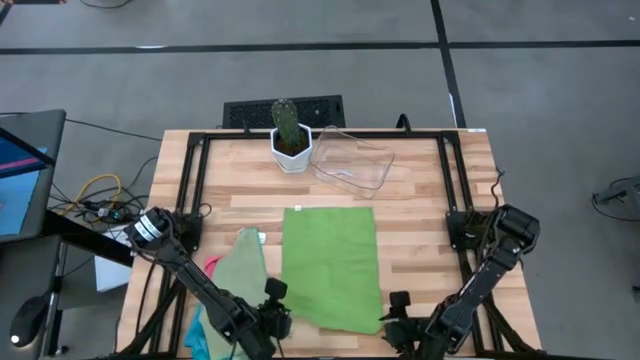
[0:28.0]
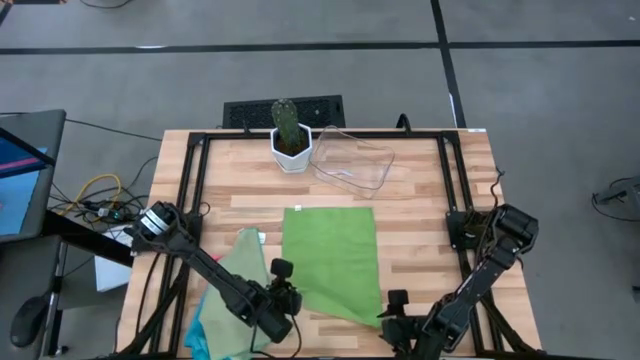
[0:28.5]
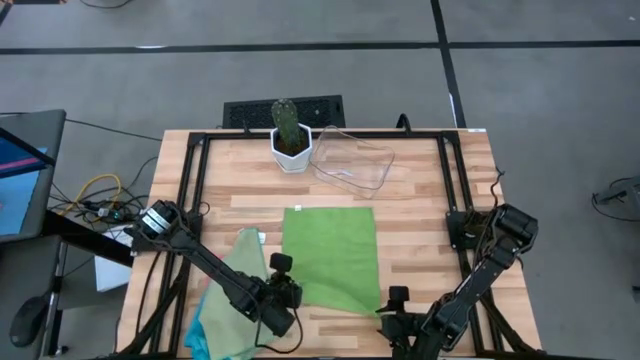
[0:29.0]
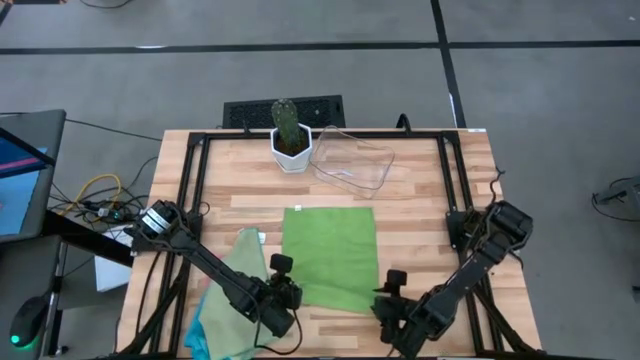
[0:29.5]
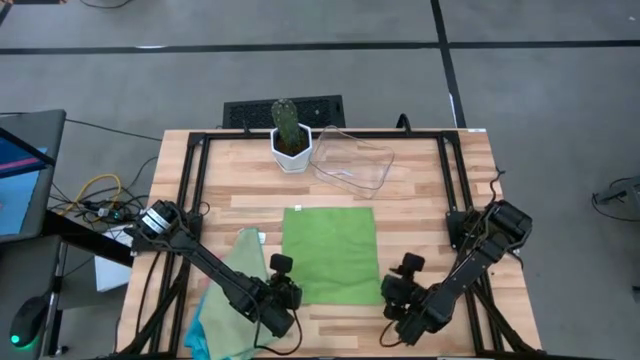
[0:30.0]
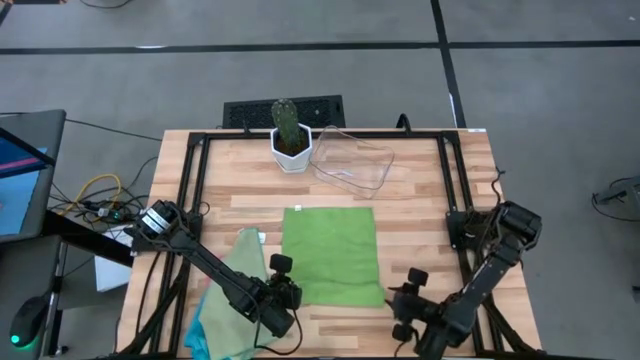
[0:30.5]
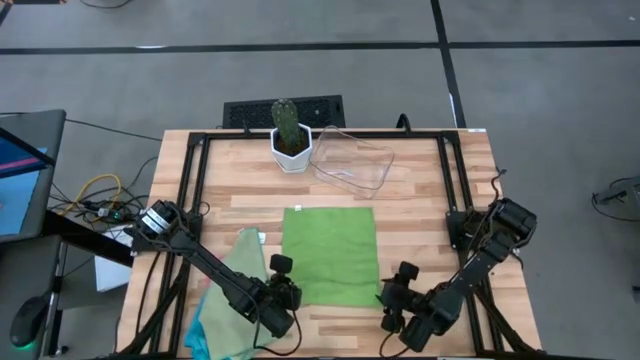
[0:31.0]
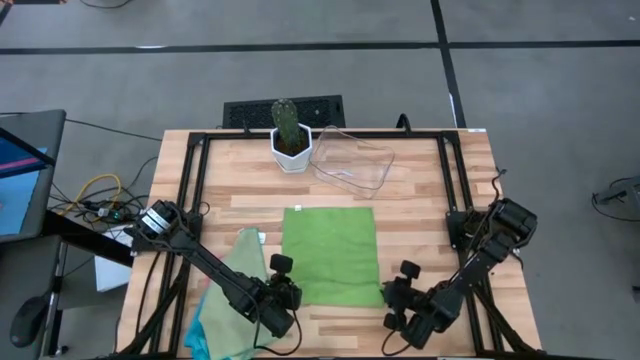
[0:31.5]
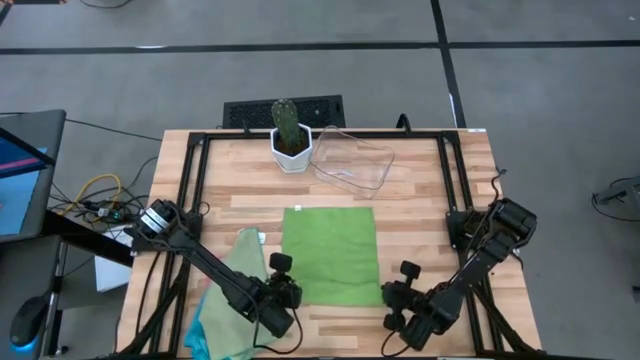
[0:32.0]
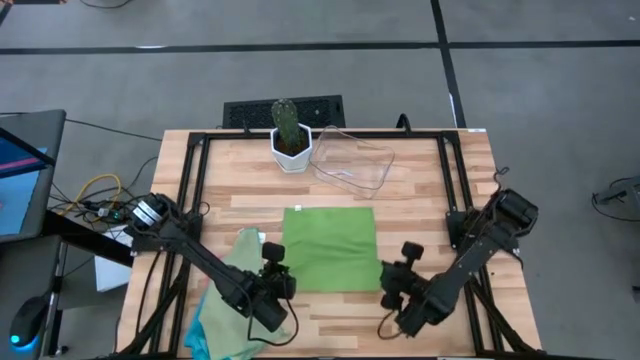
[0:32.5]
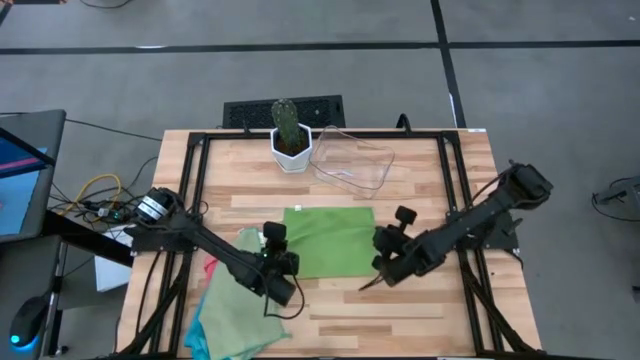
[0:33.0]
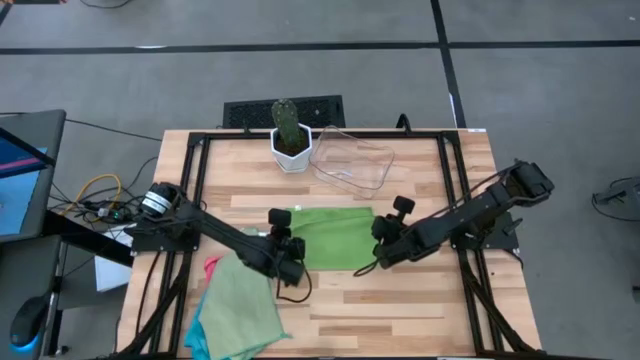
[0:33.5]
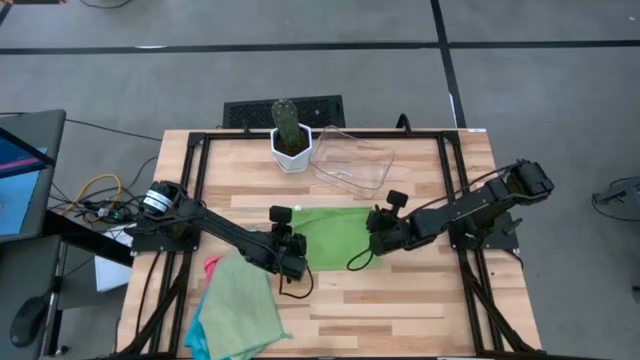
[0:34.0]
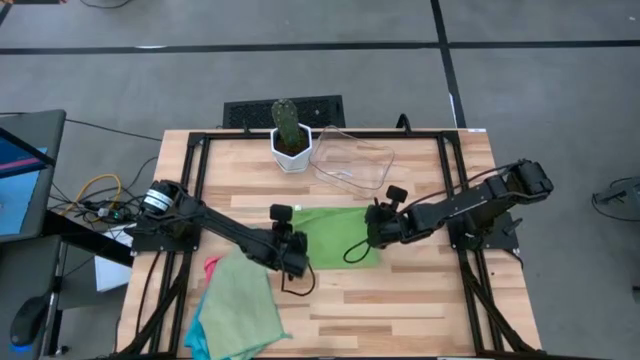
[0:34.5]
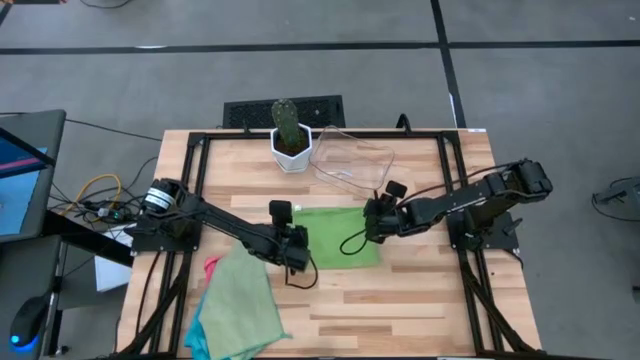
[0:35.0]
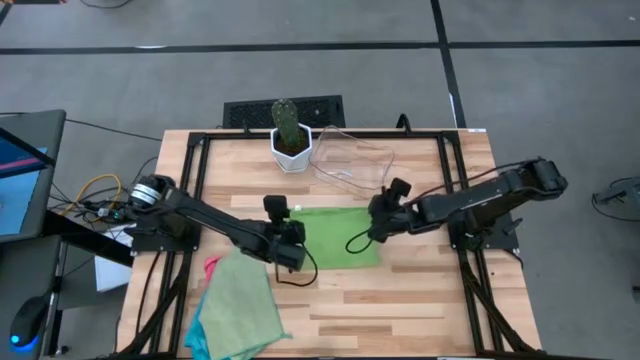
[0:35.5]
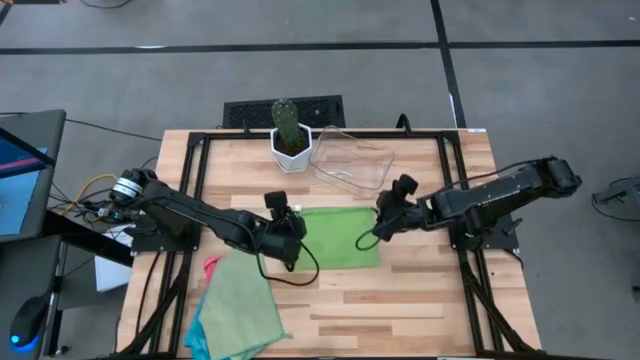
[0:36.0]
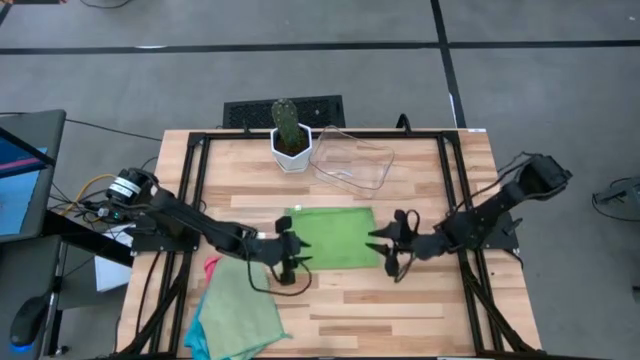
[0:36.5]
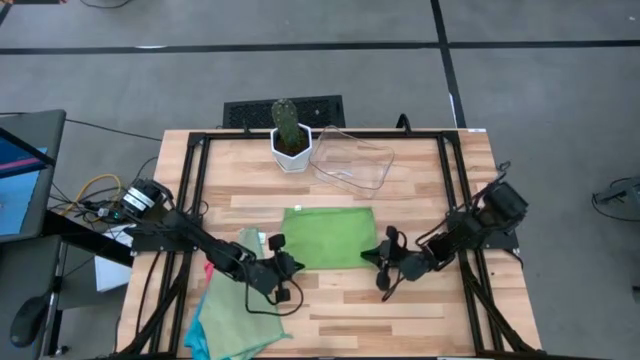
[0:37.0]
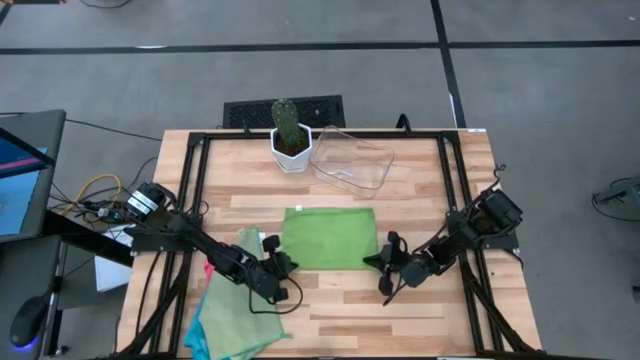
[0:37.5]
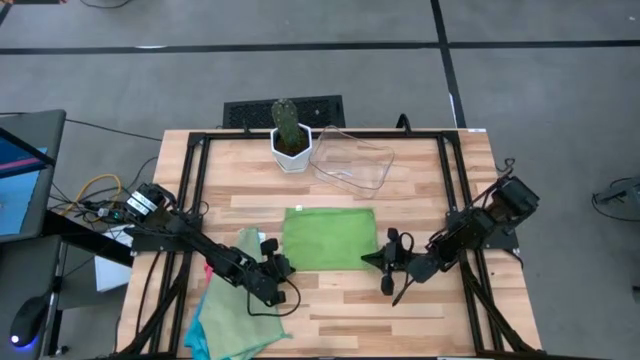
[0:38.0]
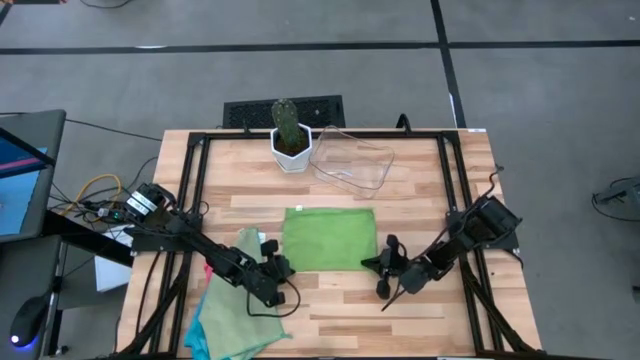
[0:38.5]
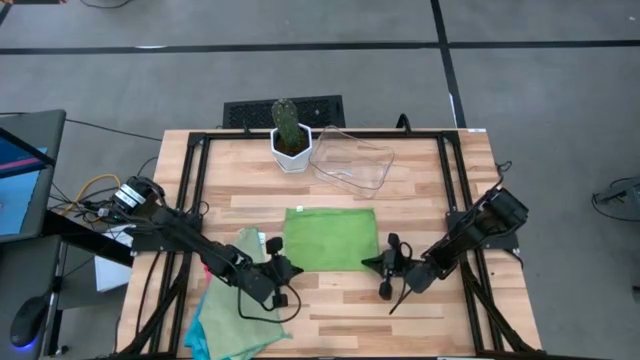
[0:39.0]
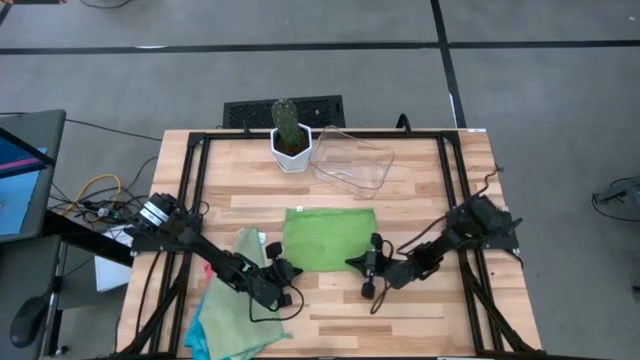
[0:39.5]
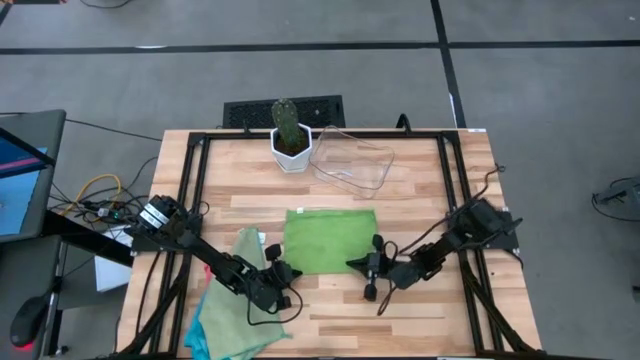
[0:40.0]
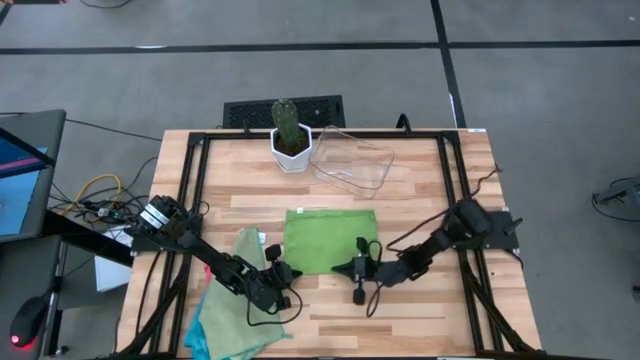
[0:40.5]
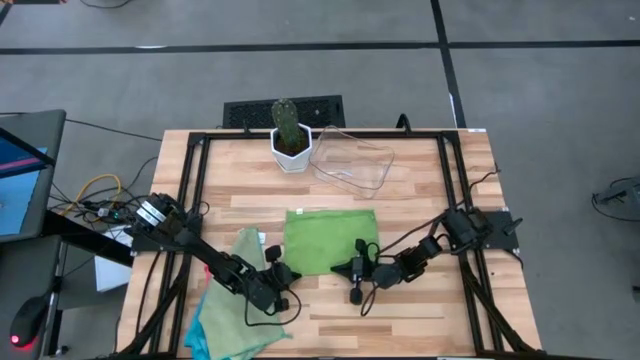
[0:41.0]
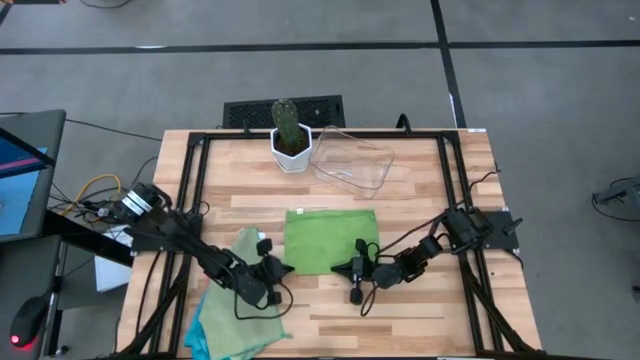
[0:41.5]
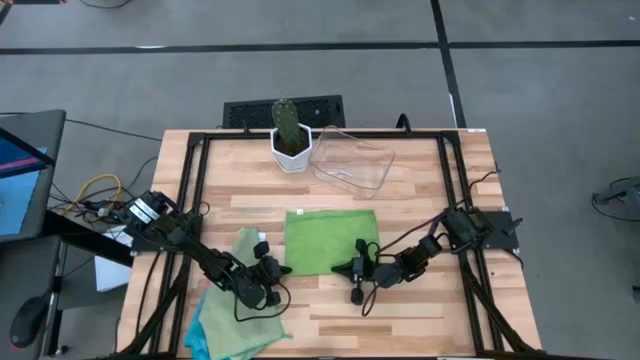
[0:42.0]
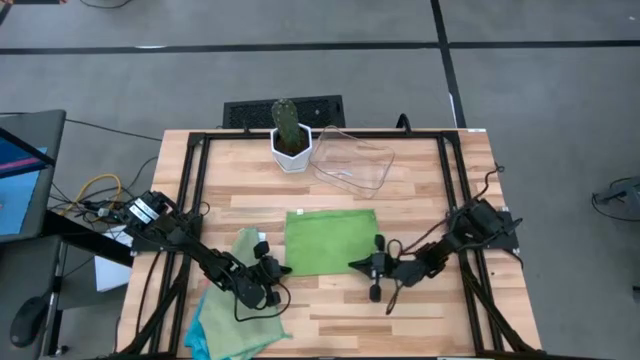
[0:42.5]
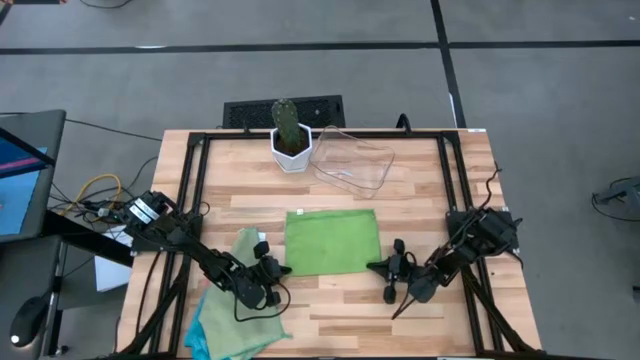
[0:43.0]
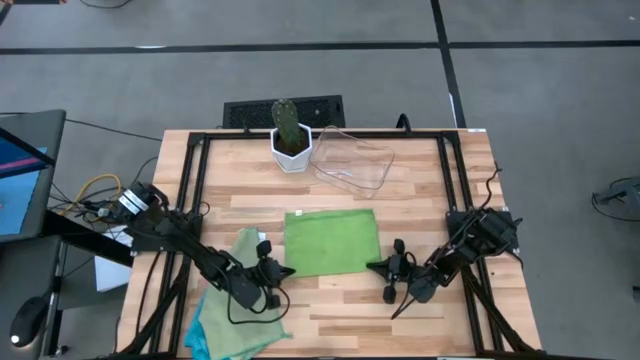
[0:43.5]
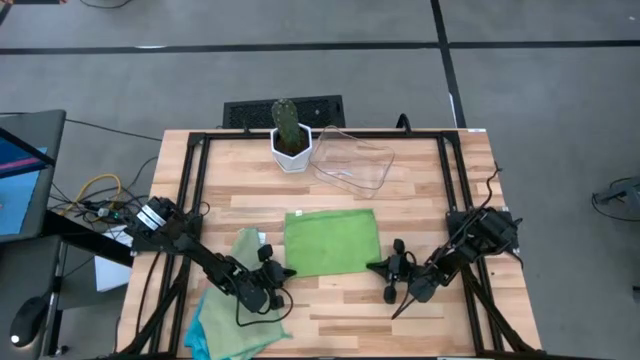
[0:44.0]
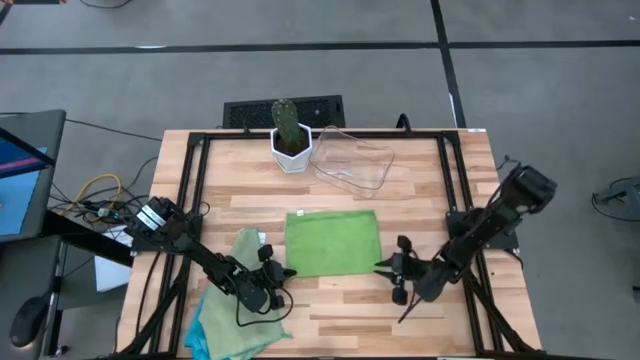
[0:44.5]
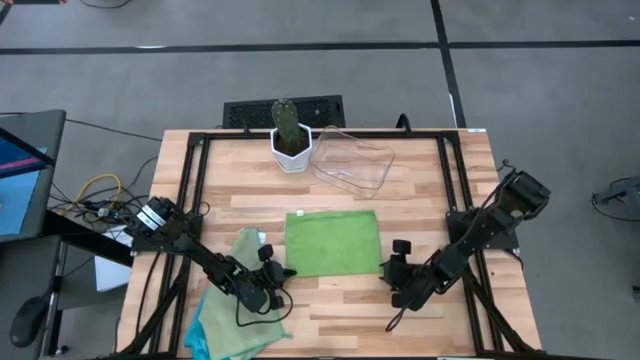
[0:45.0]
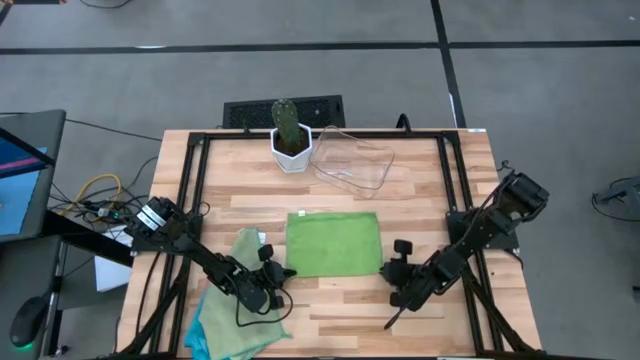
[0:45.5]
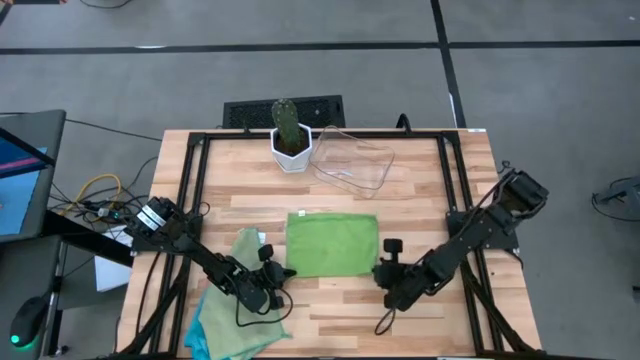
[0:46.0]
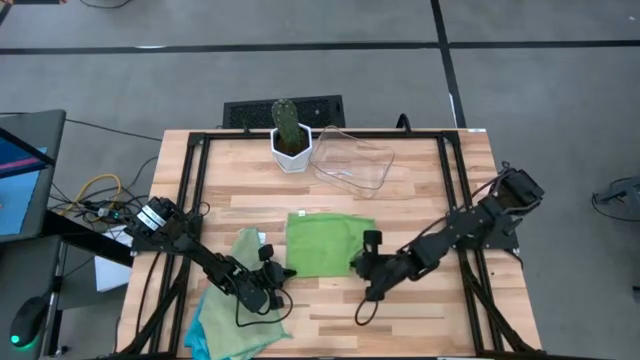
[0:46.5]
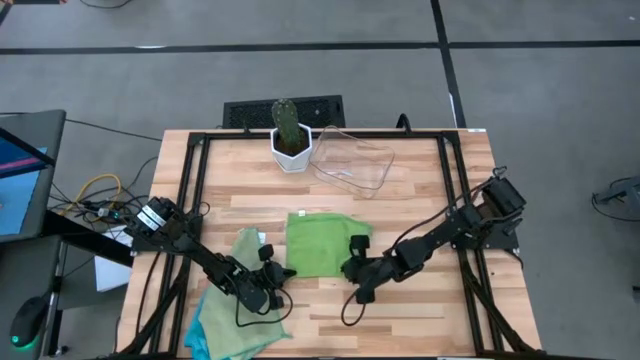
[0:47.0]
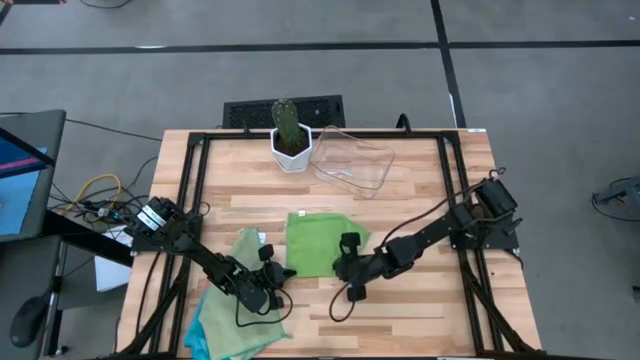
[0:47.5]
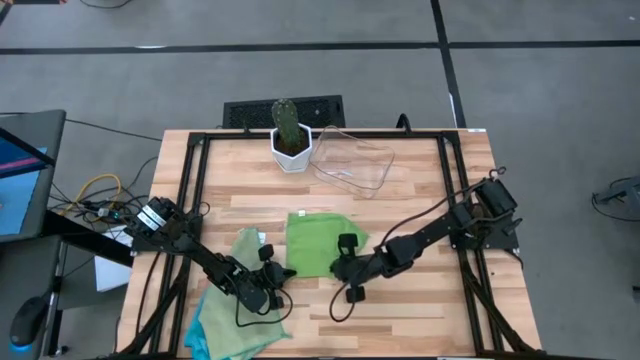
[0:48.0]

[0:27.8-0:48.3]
Task: Fold microfiber towels
Fold the green towel
